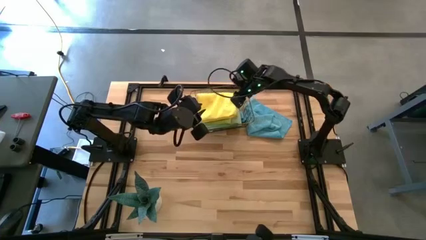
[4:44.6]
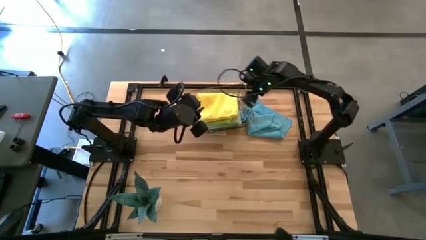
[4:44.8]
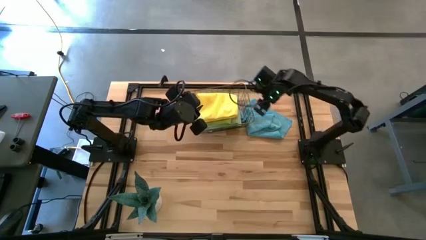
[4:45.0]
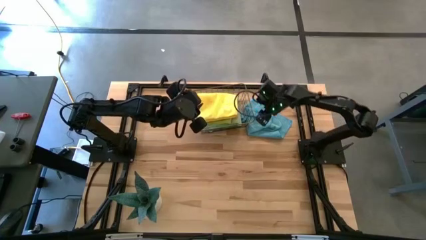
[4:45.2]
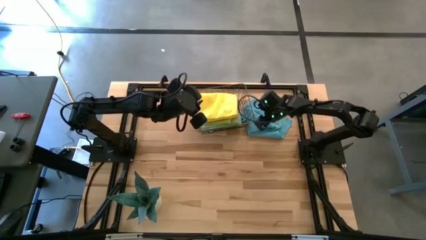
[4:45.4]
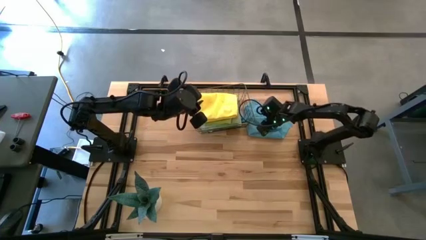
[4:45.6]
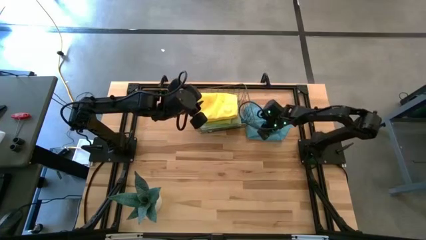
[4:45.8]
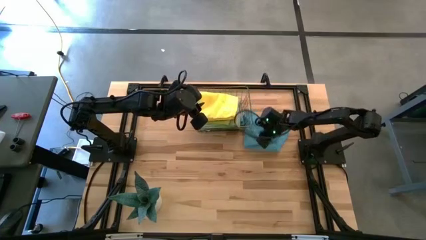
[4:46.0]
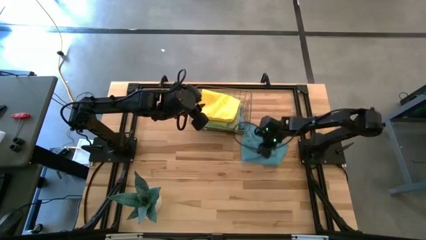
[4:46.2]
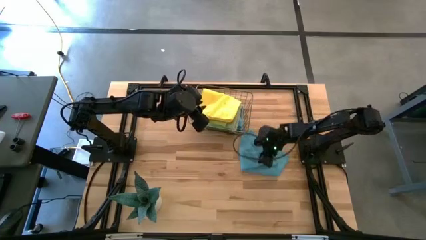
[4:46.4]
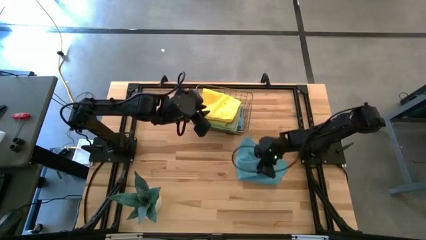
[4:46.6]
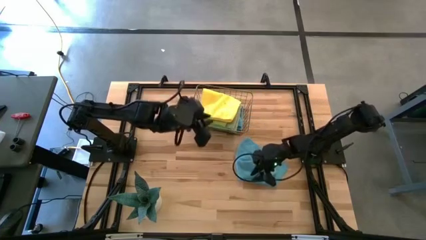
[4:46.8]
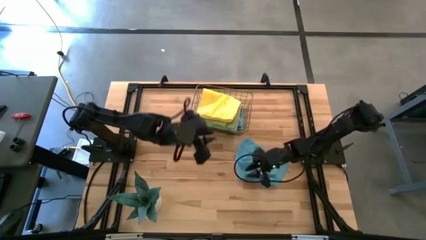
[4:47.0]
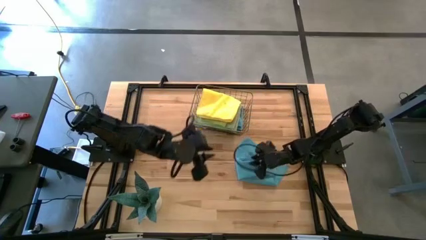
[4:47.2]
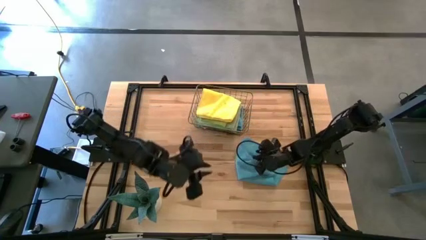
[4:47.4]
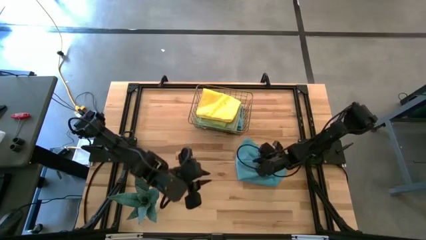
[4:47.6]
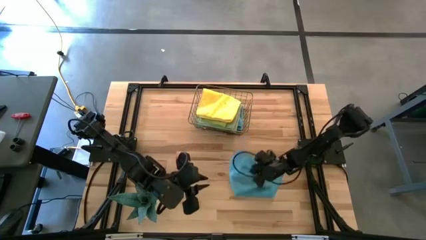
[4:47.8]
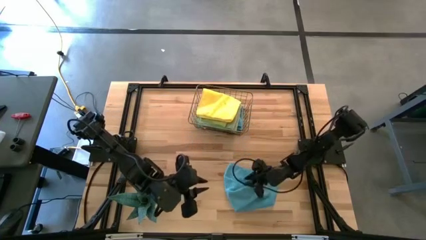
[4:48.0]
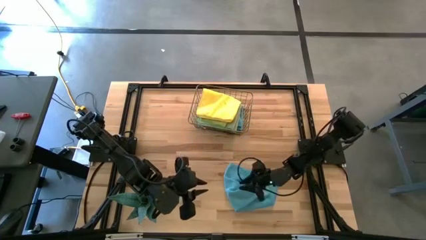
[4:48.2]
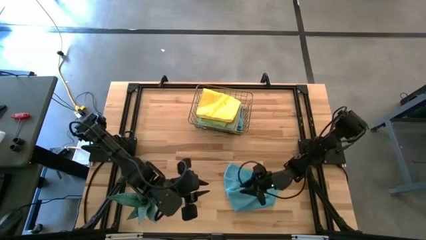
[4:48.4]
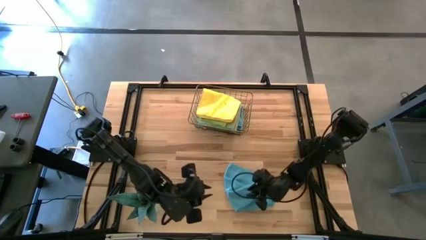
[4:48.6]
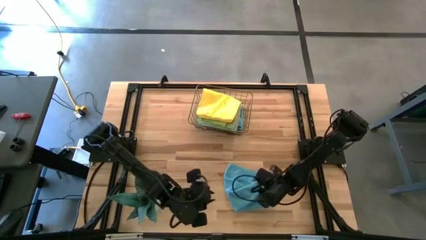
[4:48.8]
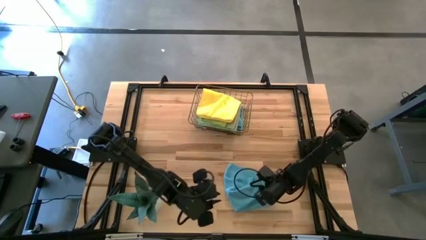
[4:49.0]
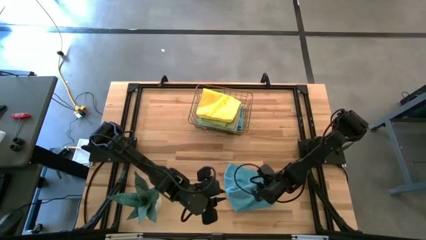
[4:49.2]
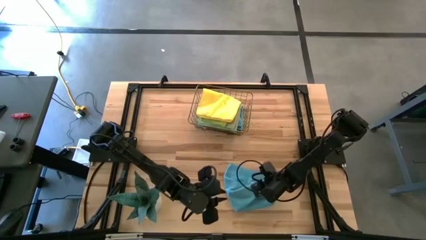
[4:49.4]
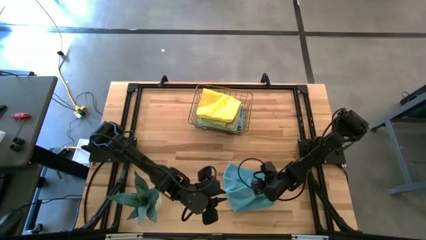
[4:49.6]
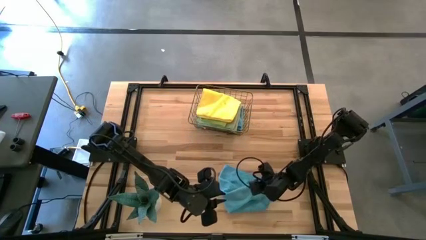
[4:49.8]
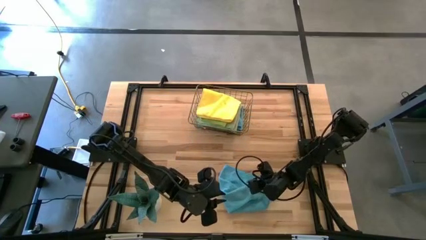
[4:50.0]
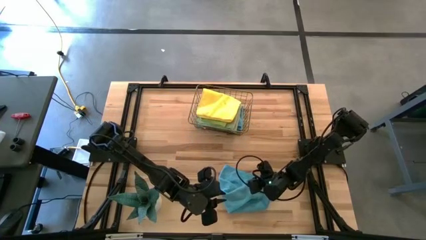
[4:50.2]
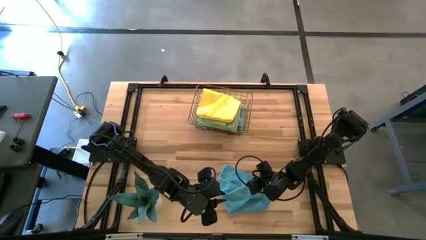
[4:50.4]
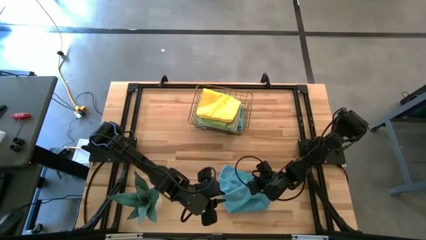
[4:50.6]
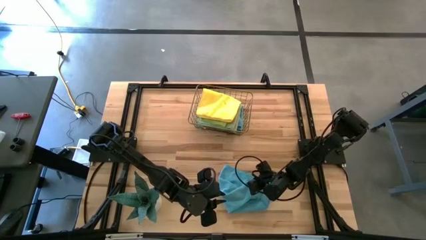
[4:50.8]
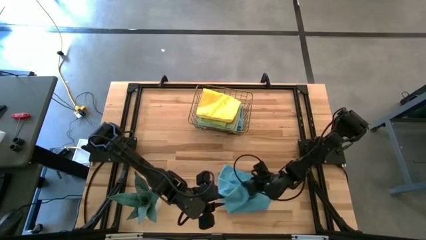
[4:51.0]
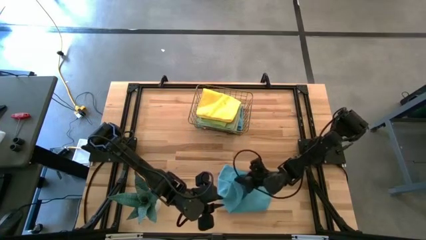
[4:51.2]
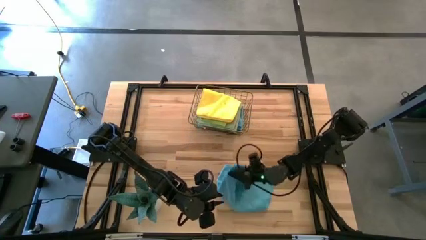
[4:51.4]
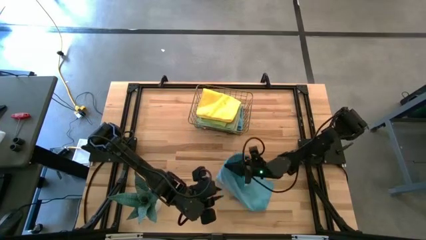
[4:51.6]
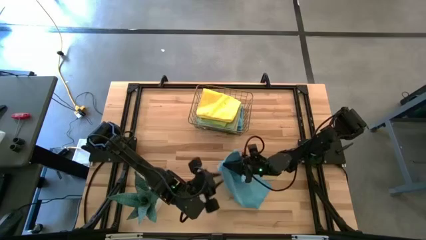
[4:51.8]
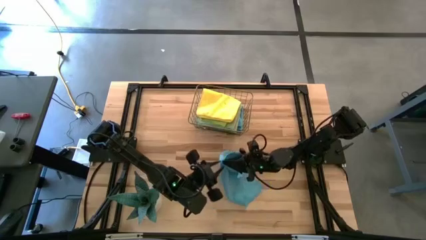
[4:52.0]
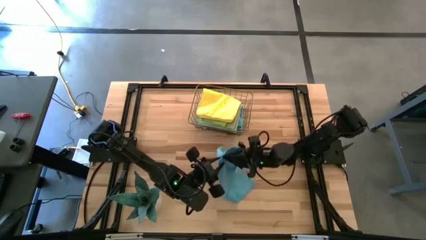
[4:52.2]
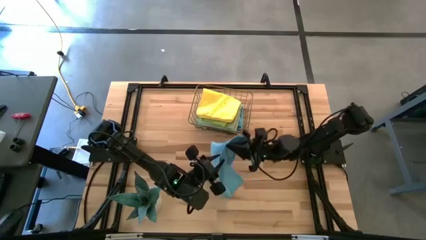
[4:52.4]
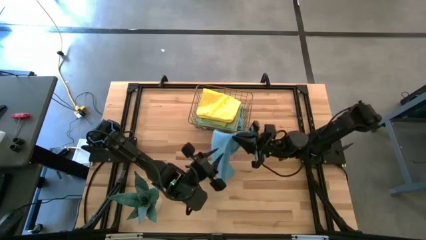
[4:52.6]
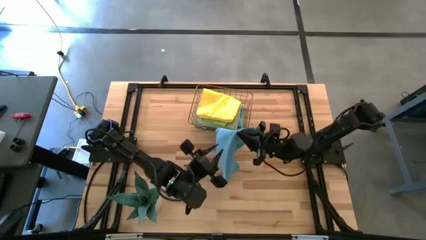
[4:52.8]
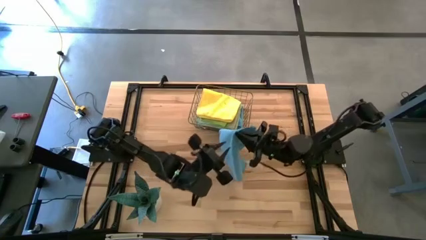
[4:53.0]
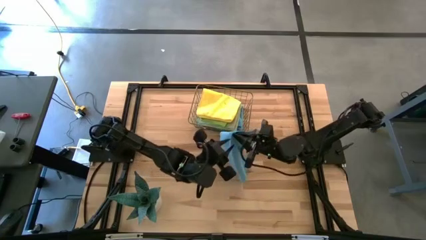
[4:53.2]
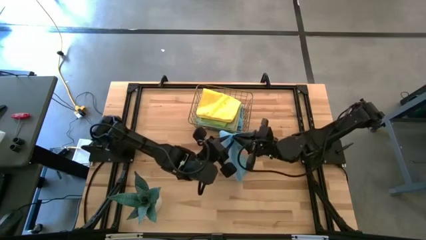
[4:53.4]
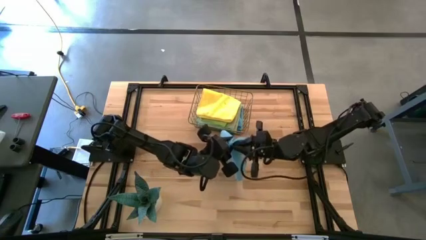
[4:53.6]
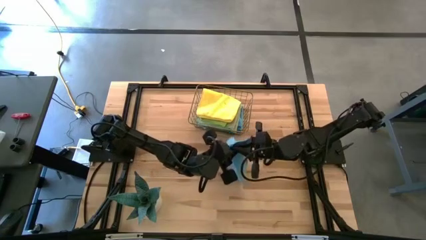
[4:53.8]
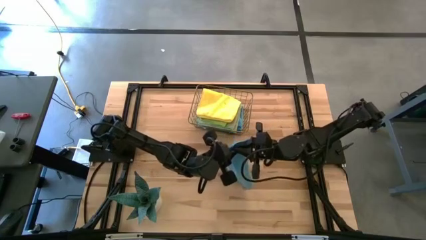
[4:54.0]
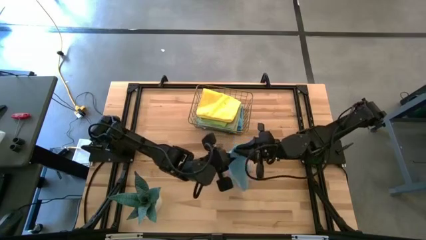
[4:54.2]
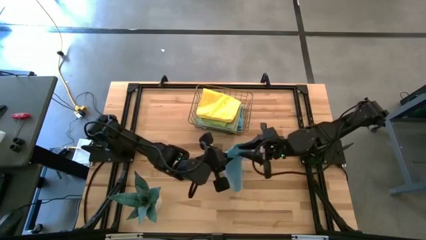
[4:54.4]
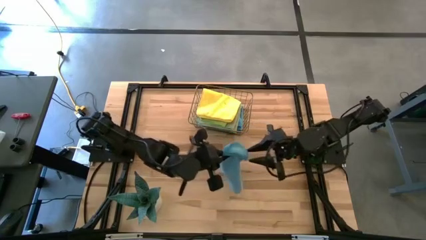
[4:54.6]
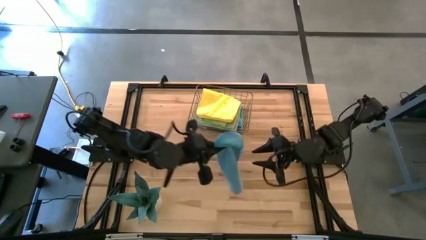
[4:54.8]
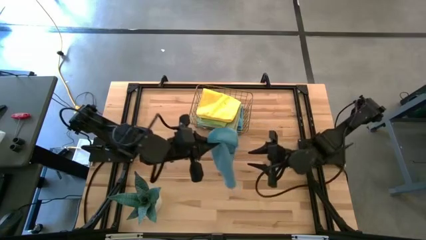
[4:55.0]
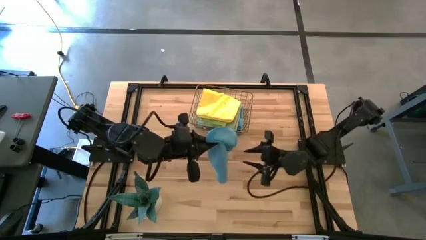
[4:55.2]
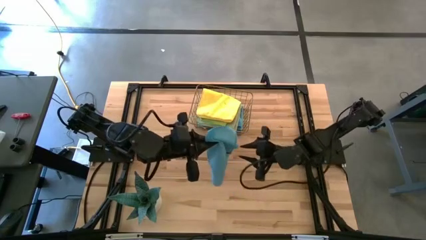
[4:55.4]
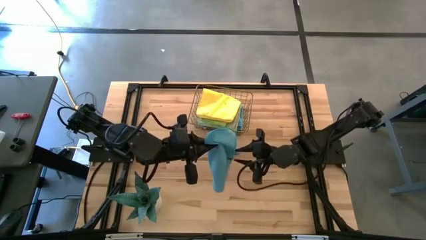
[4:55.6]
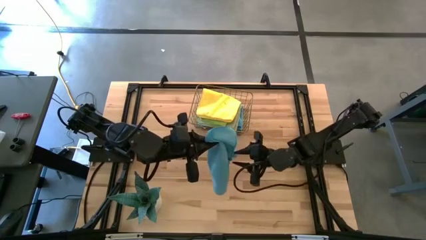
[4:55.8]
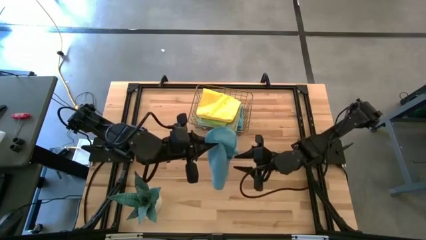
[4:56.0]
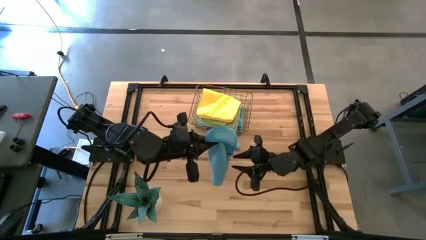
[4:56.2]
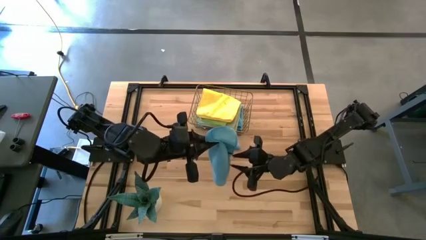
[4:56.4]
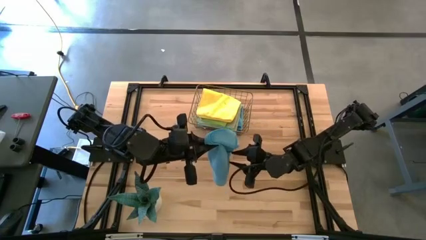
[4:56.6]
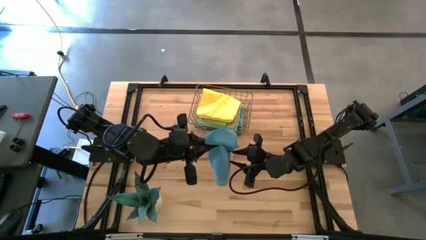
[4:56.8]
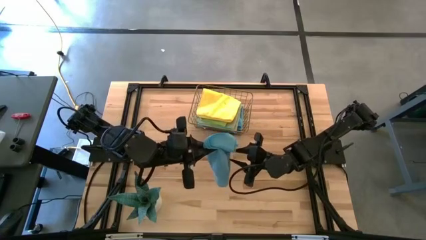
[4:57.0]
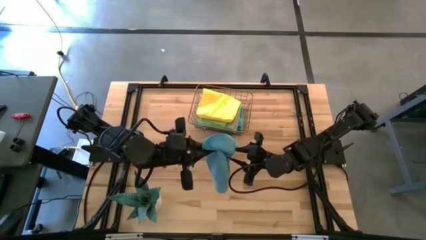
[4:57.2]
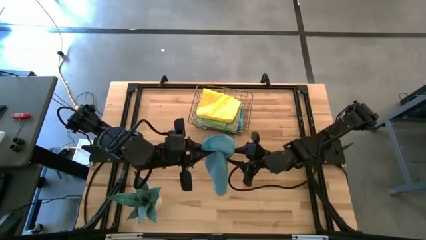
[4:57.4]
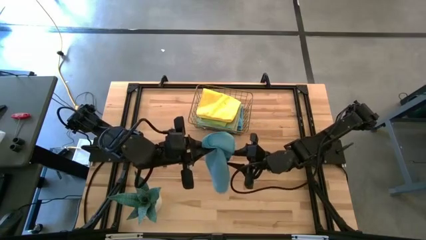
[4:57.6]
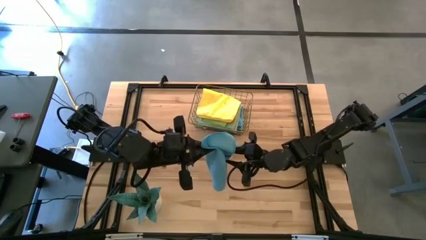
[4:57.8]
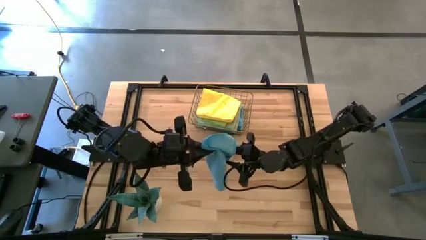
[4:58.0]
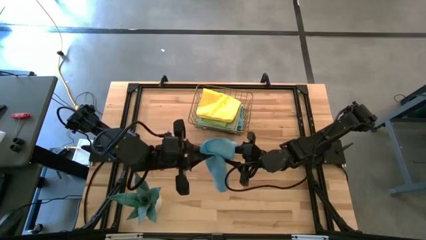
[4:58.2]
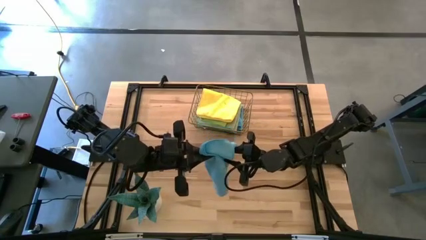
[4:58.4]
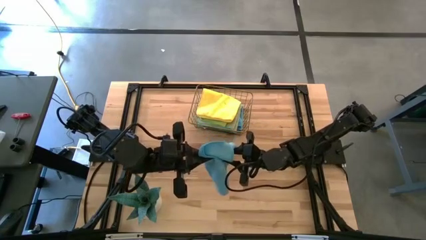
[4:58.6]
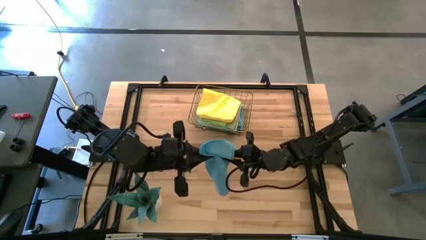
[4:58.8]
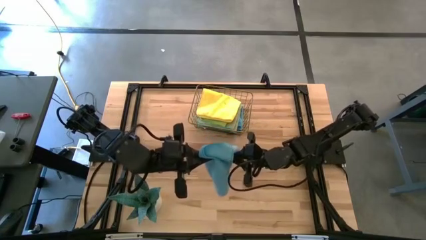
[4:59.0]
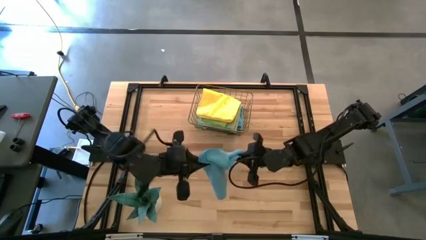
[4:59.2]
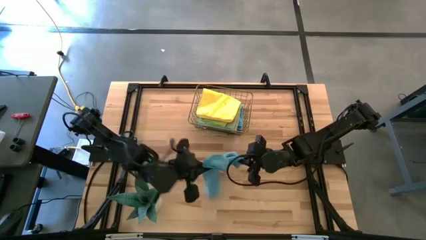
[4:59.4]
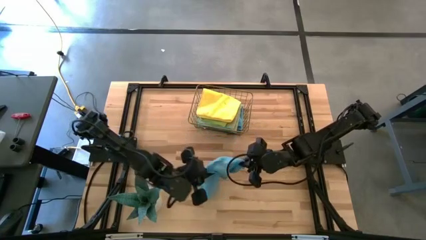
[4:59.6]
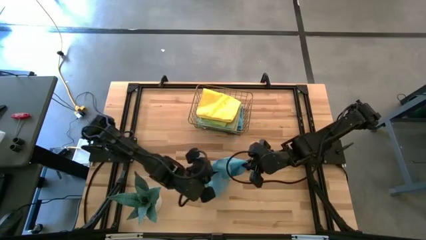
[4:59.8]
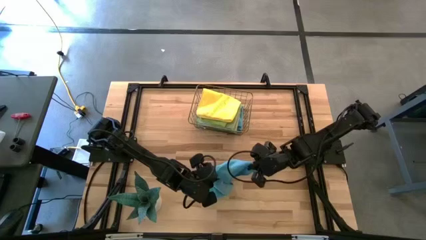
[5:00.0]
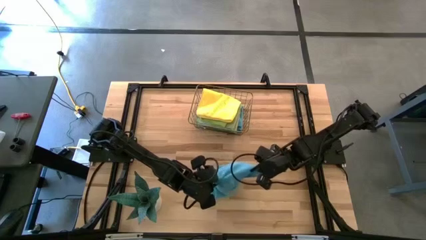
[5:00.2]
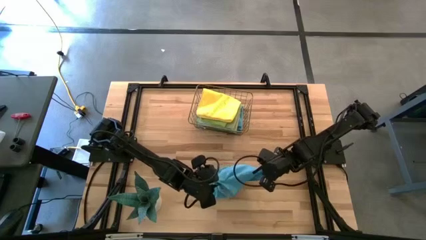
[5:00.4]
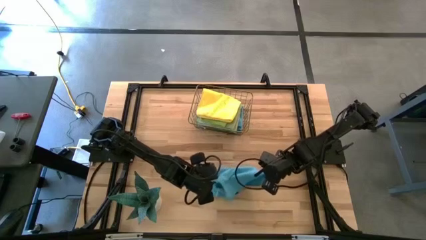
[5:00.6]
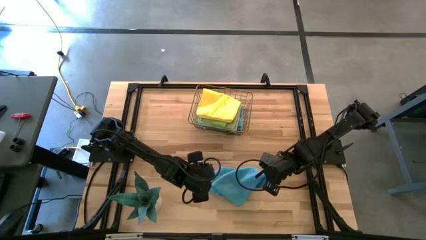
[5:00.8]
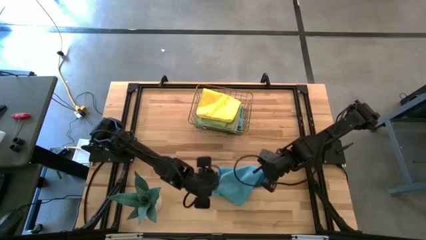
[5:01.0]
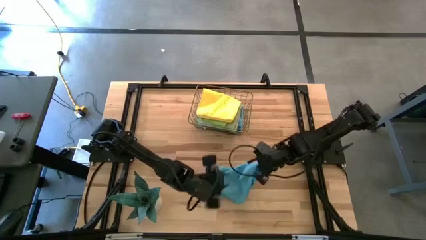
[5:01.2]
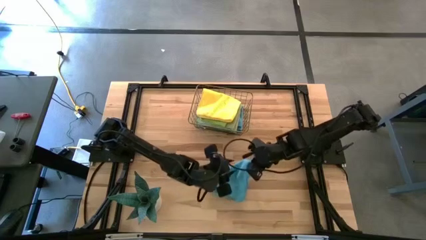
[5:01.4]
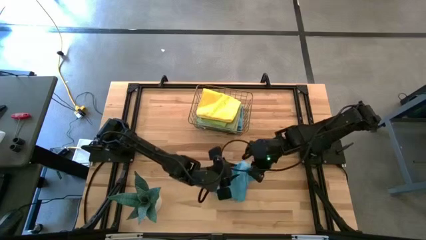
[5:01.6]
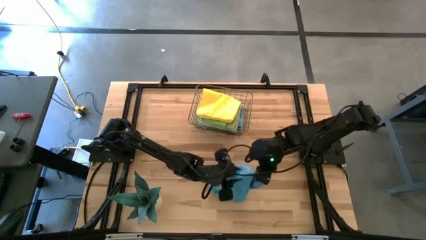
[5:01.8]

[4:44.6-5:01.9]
Task: Fold microfiber towels
Fold the blue towel
